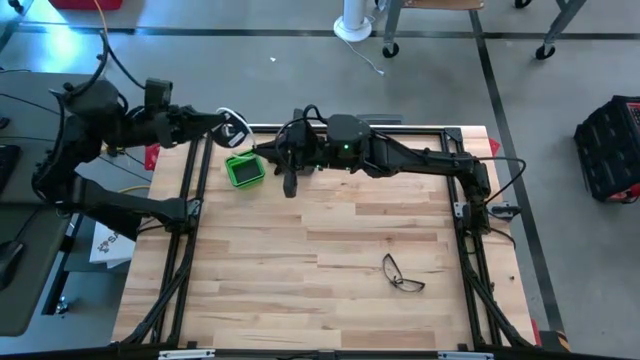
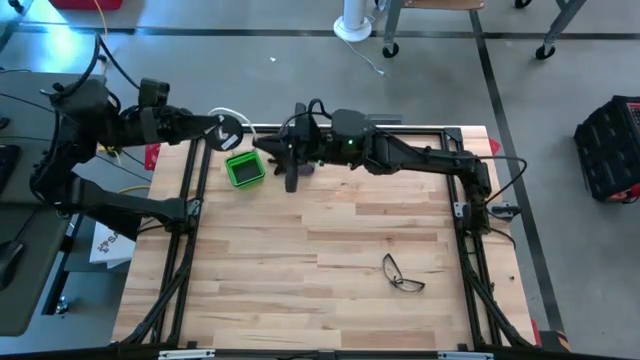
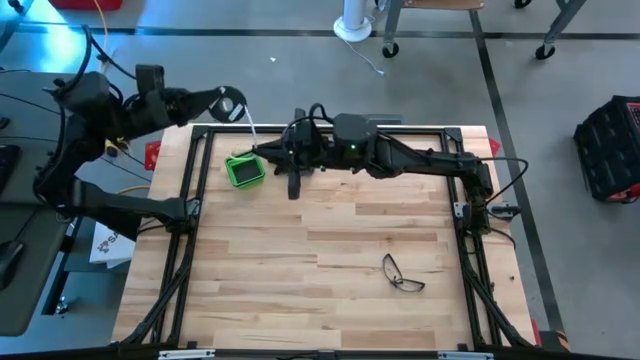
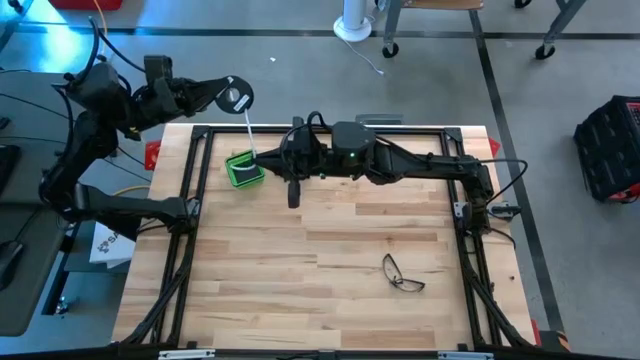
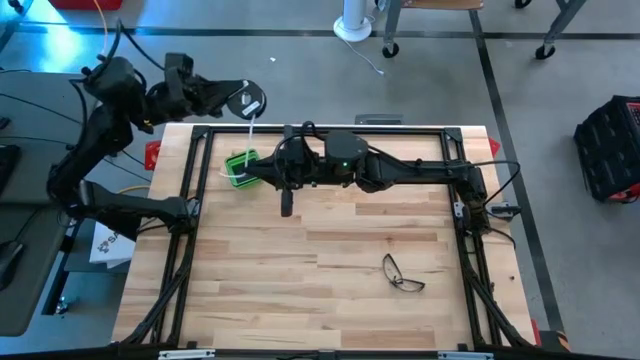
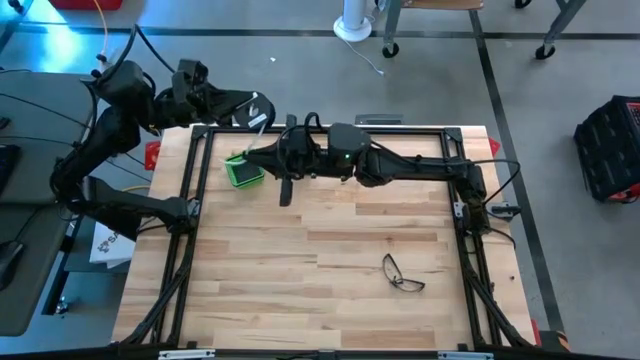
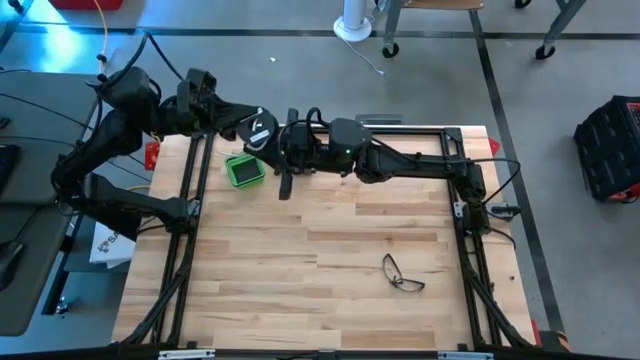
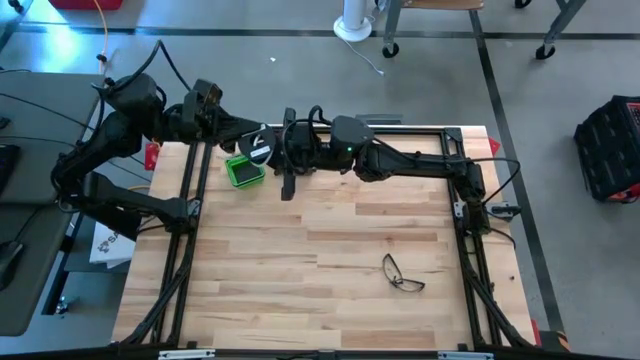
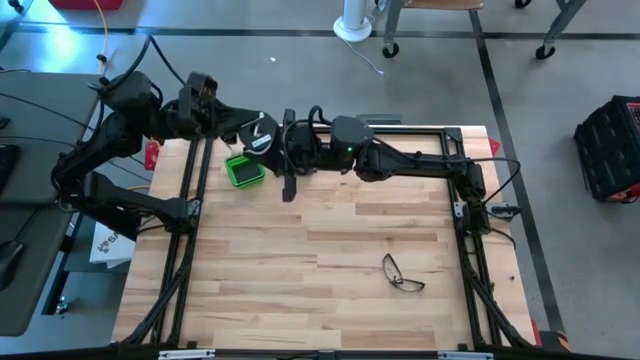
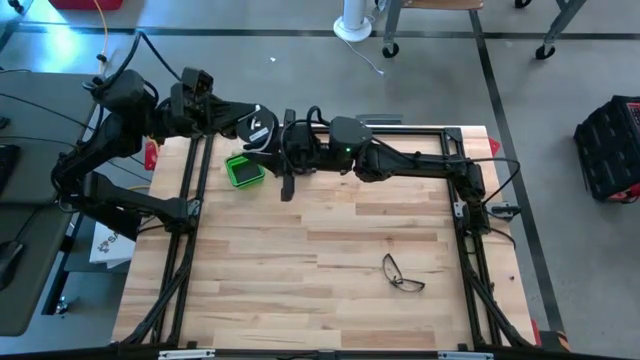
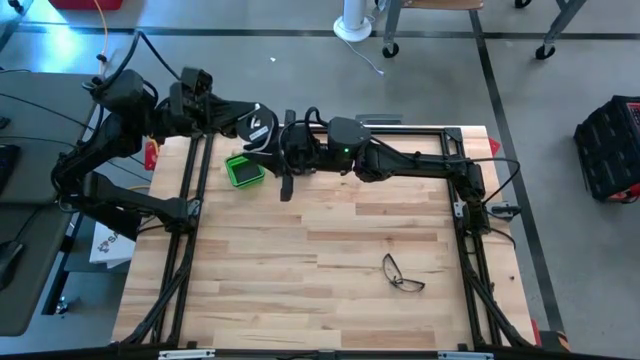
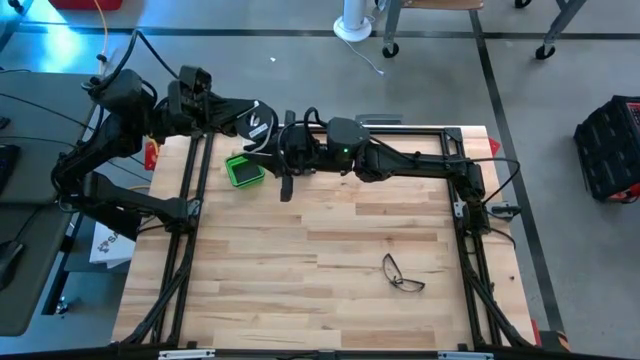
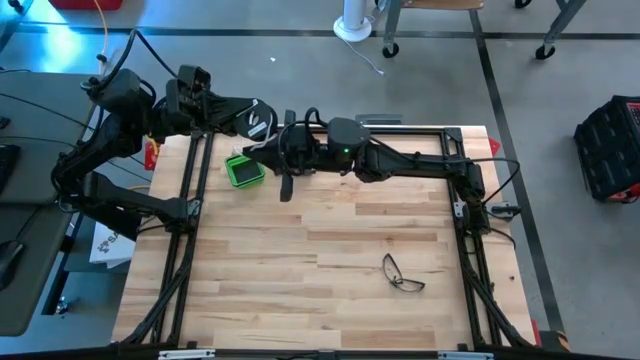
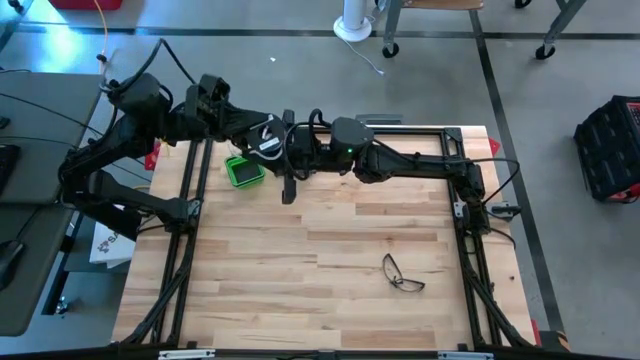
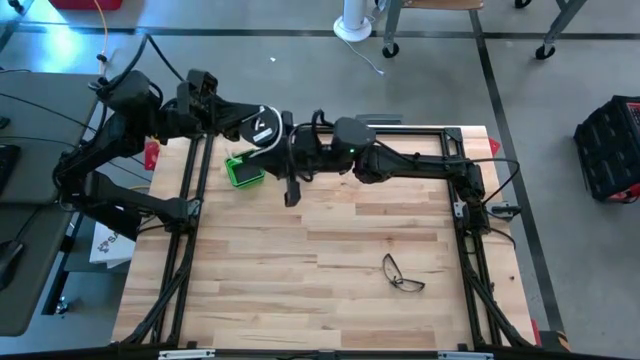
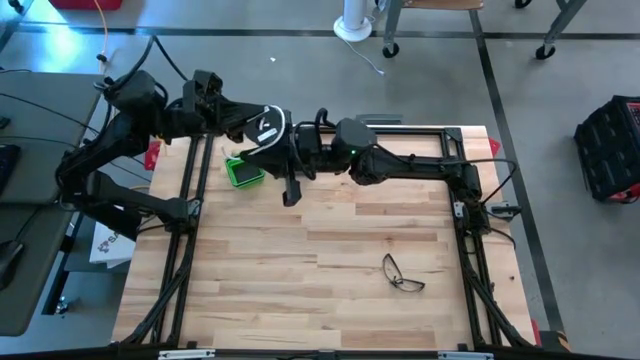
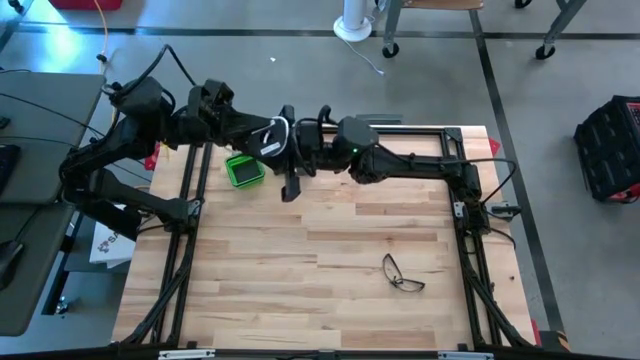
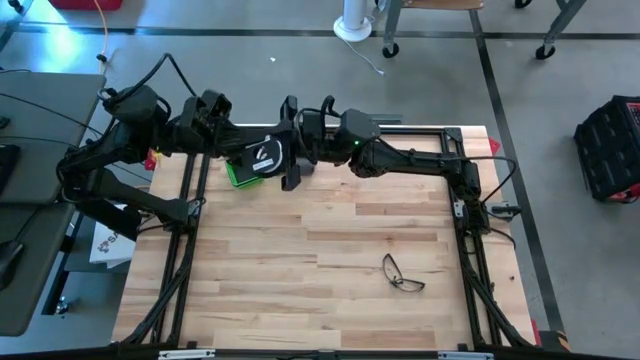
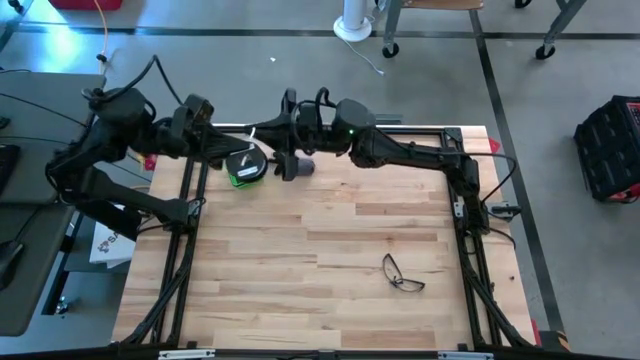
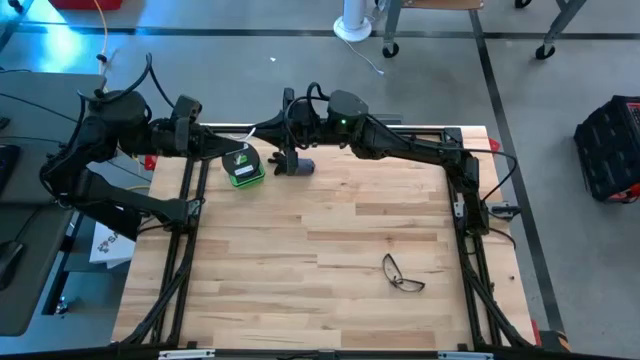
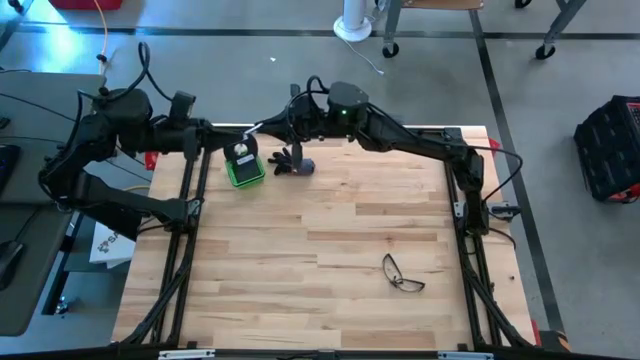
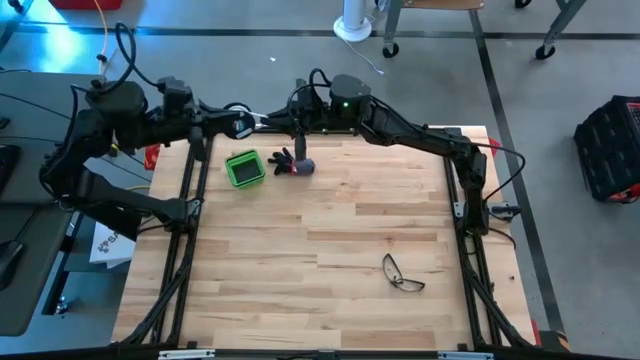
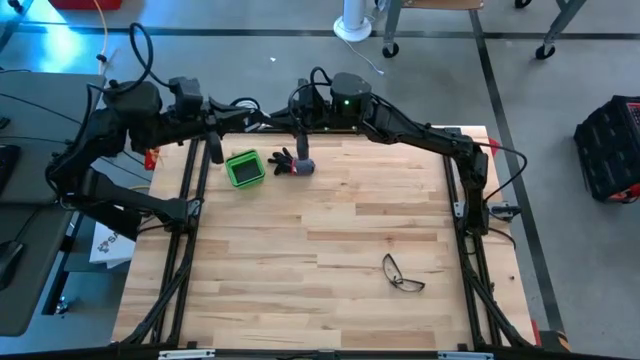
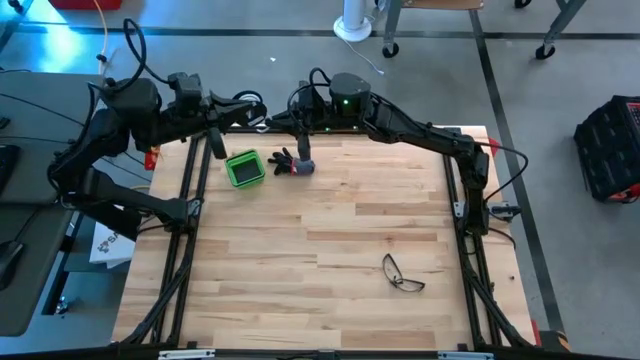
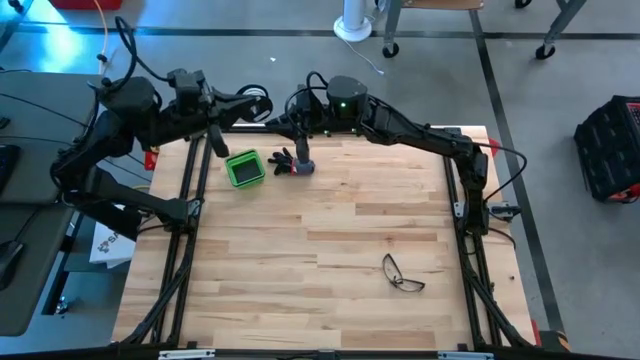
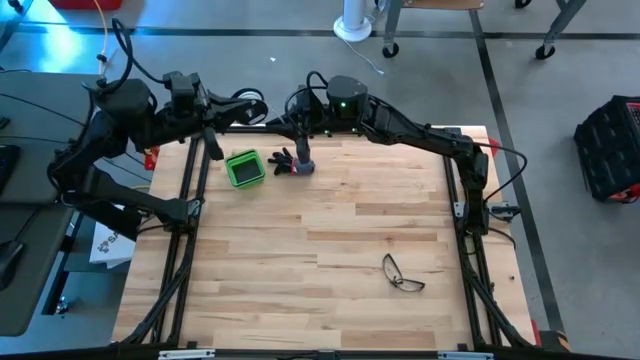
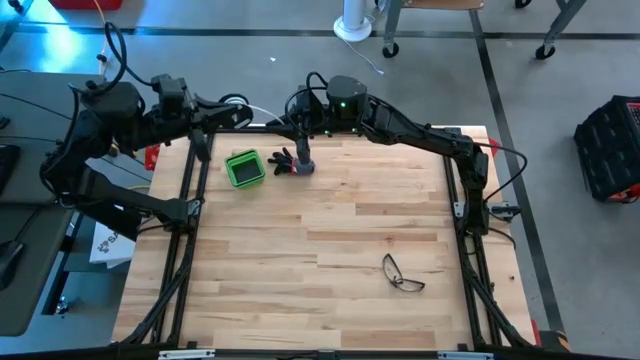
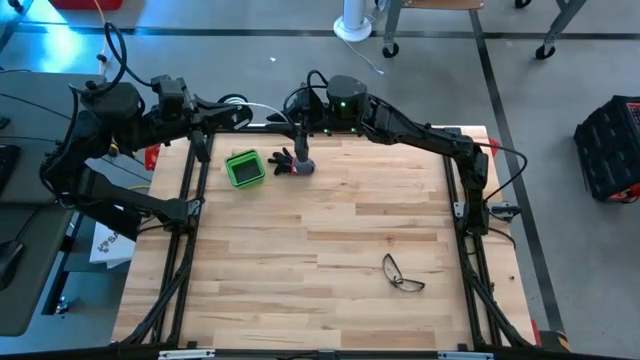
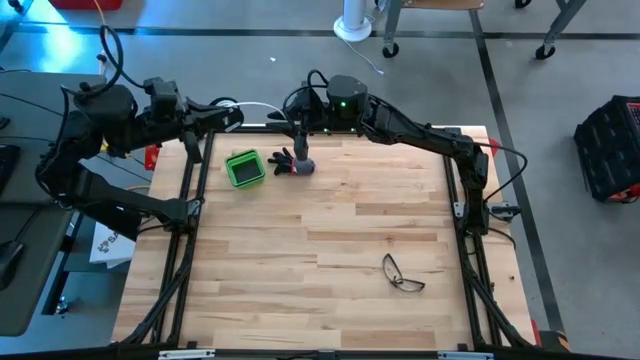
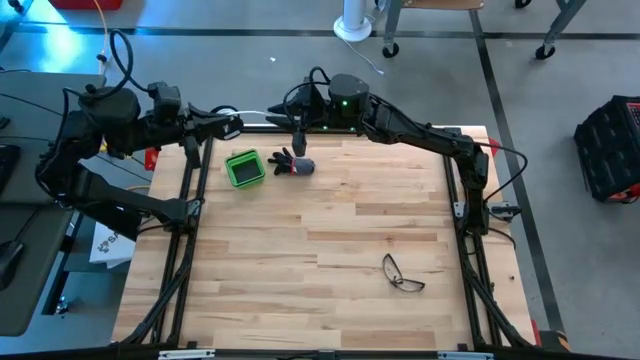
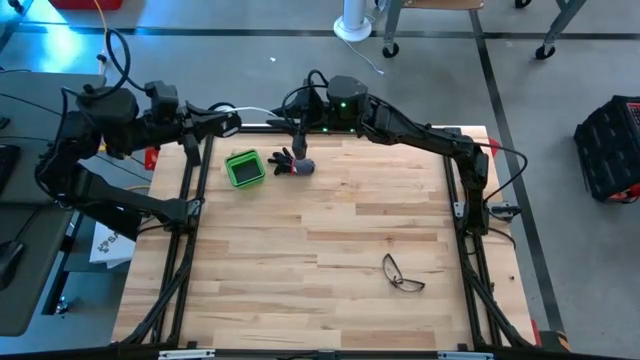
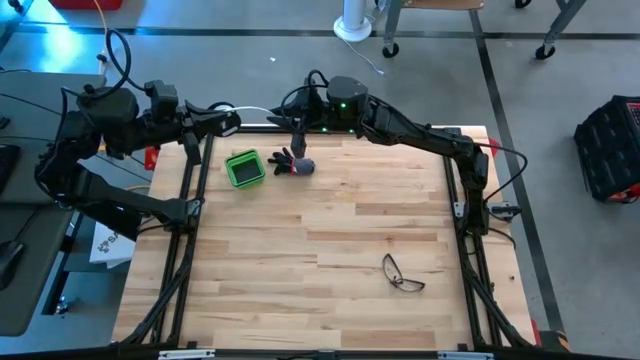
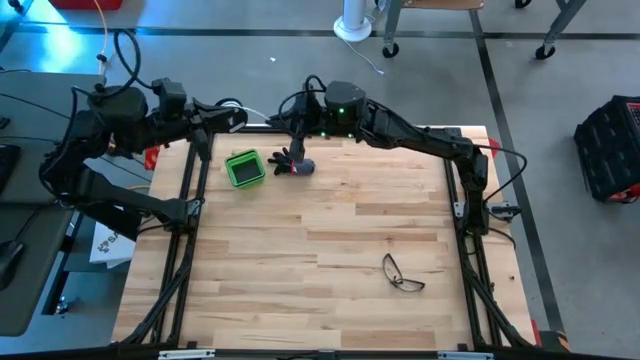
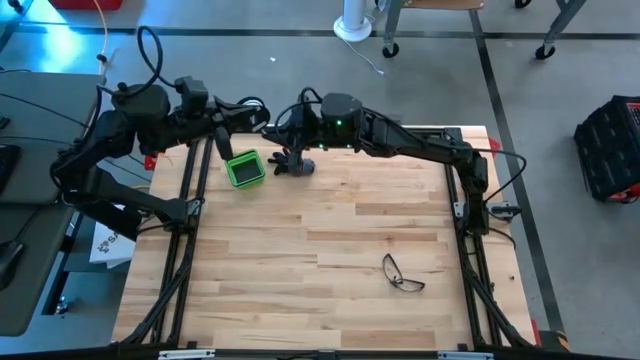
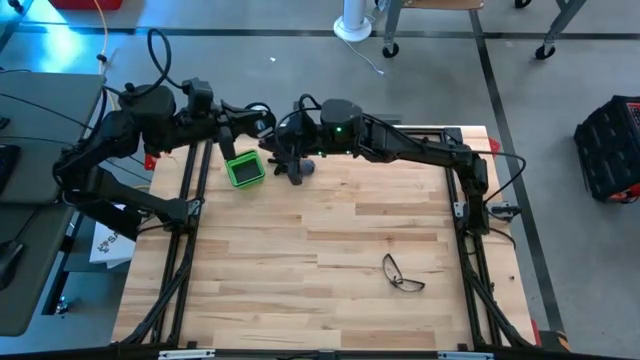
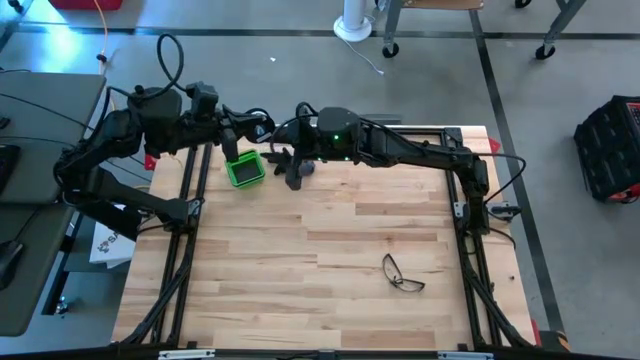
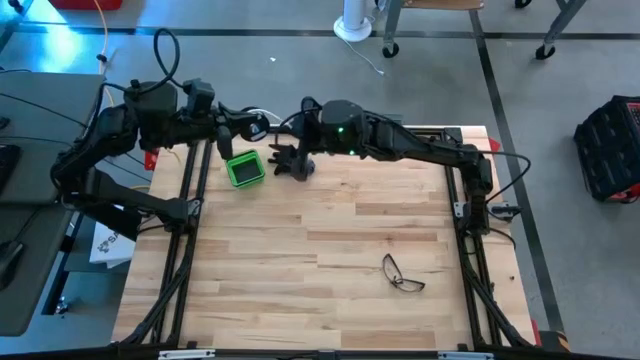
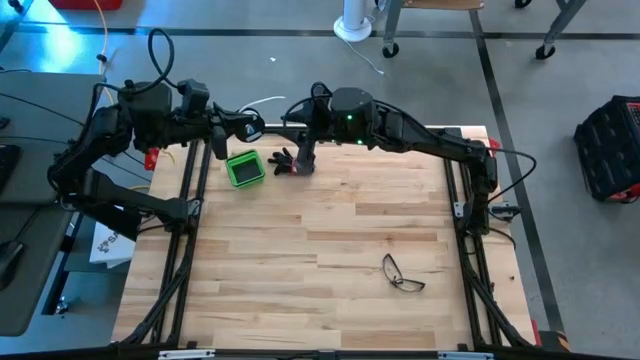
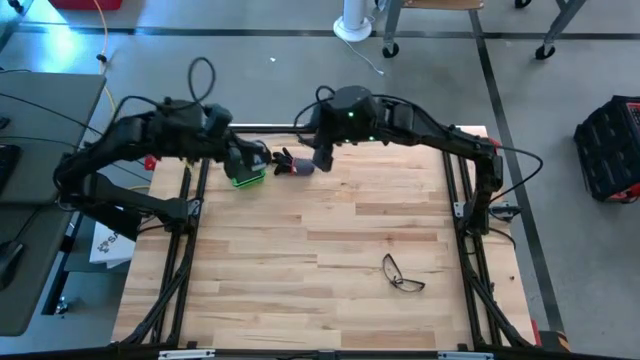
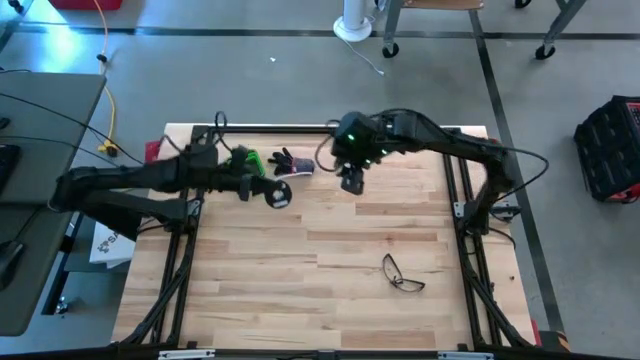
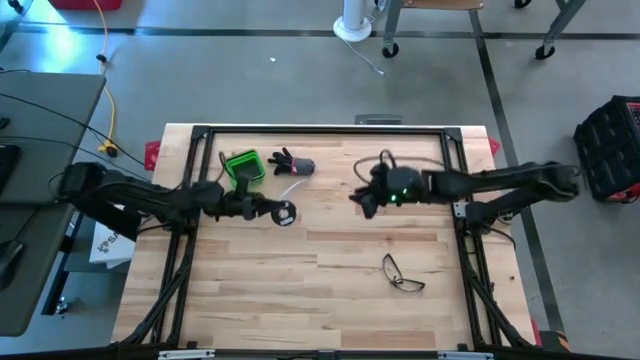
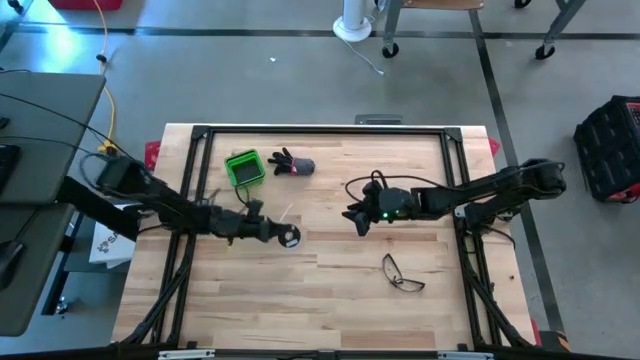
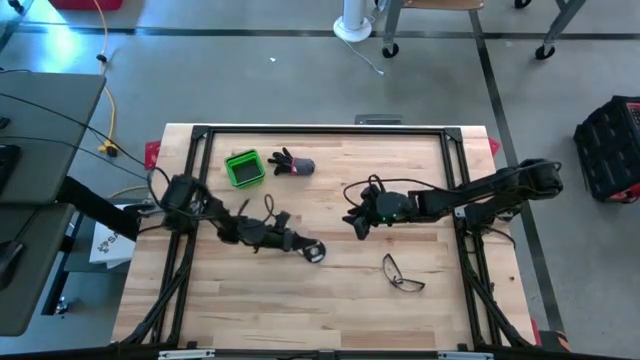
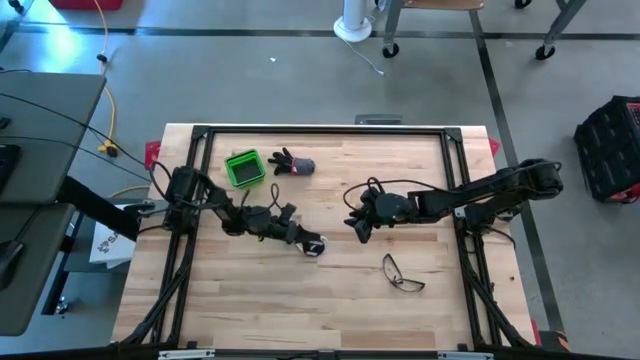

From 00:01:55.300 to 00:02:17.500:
Task: Coil cords
Coil the white wire on the spool
